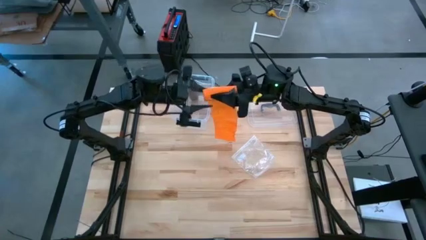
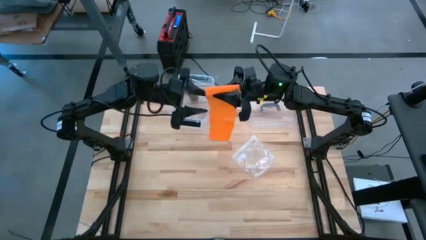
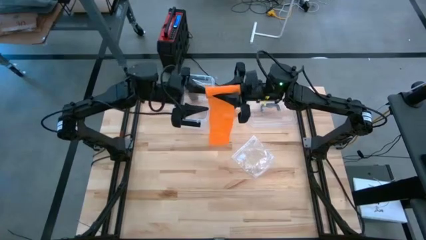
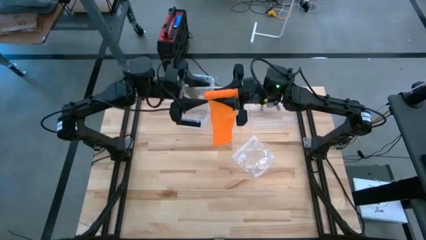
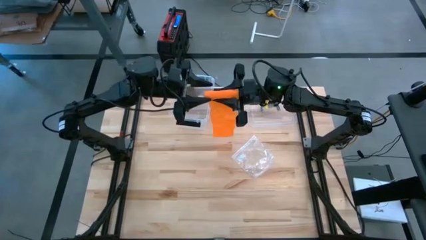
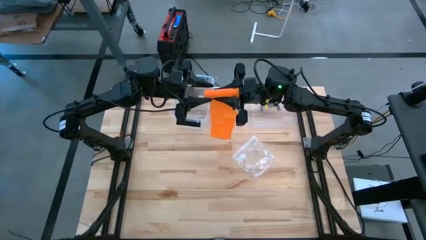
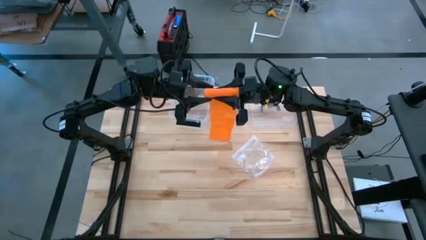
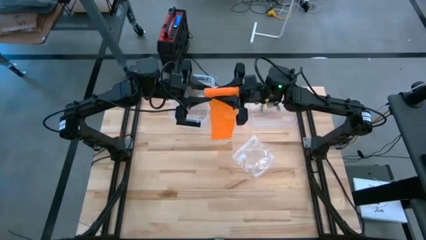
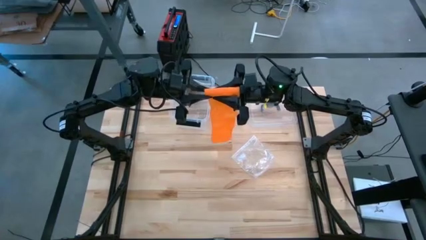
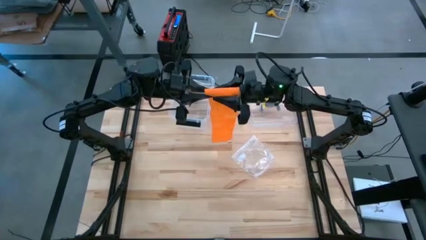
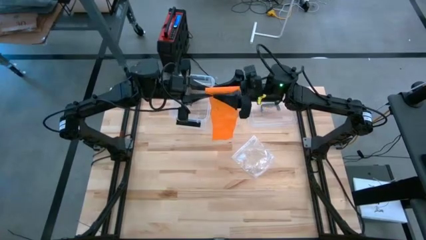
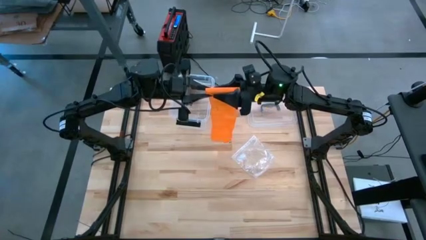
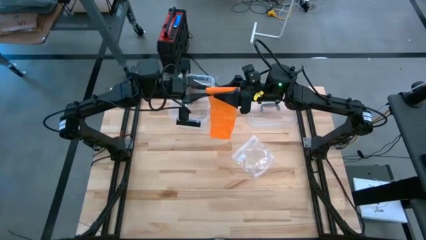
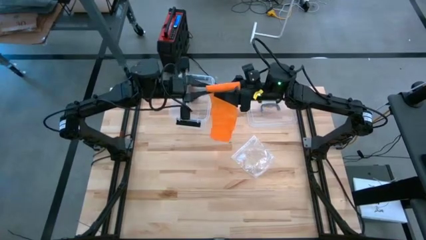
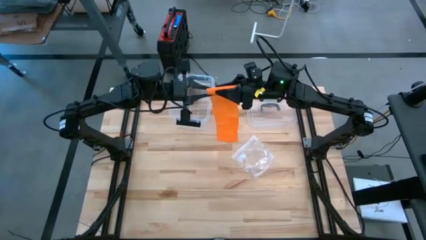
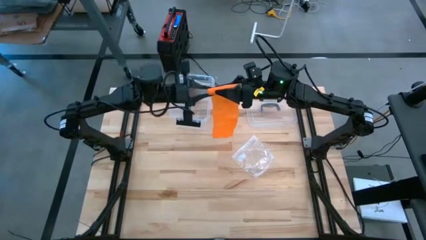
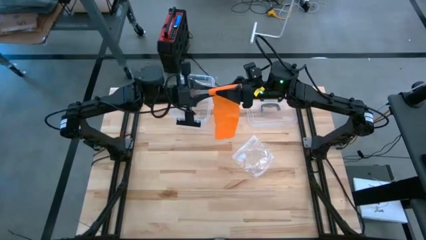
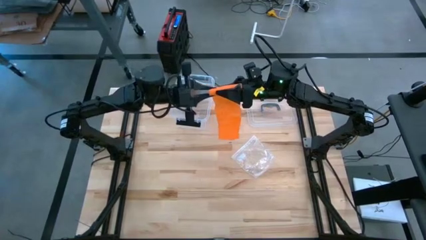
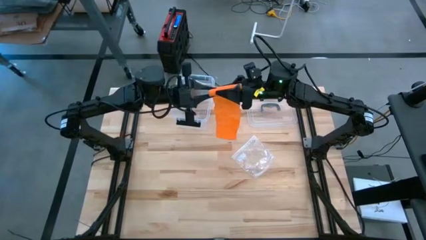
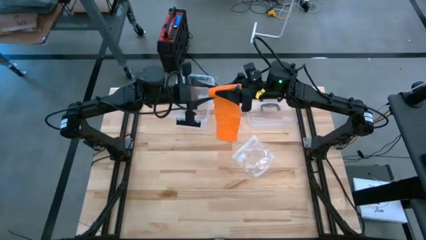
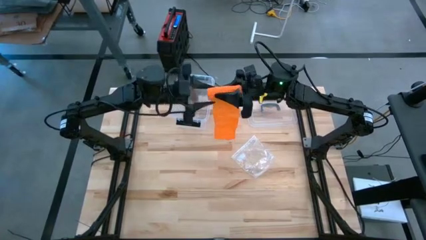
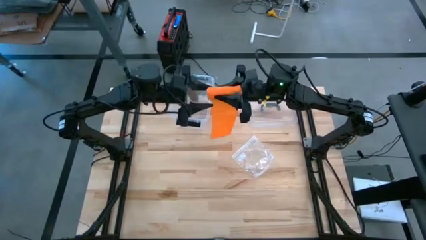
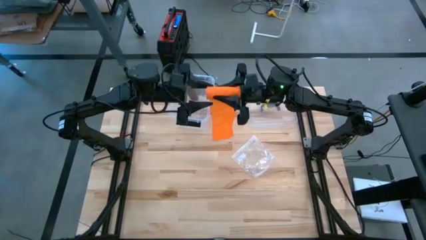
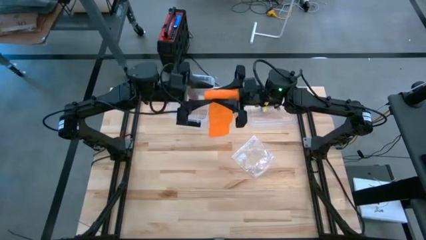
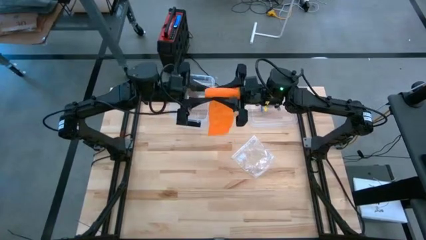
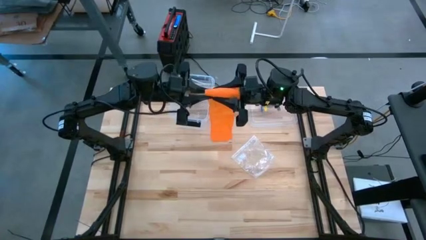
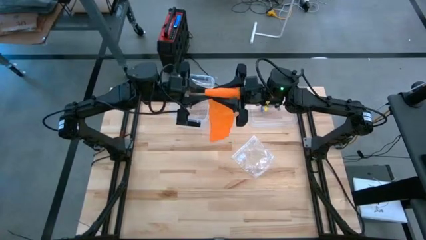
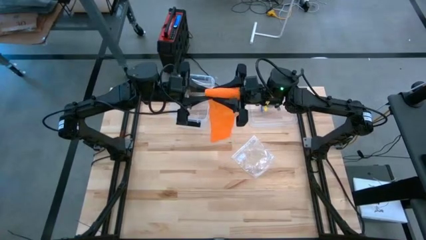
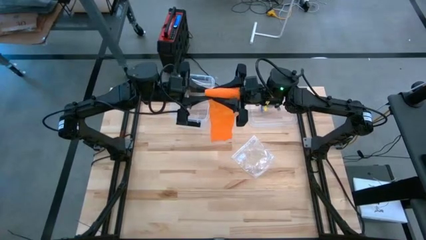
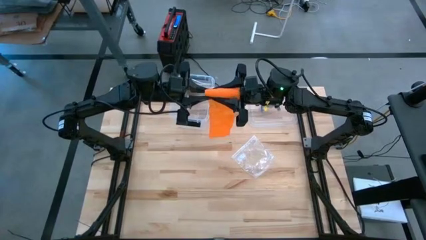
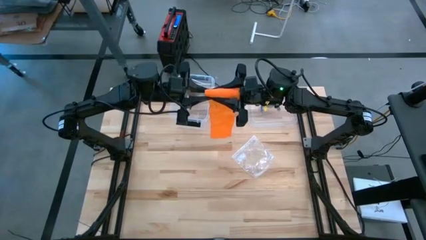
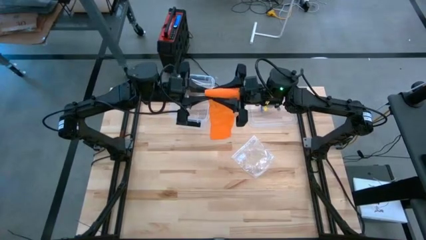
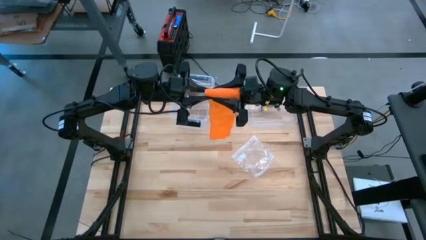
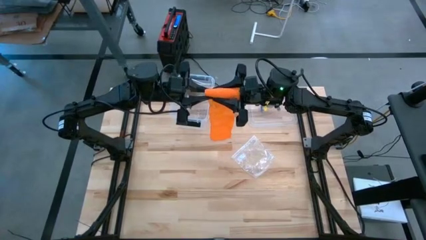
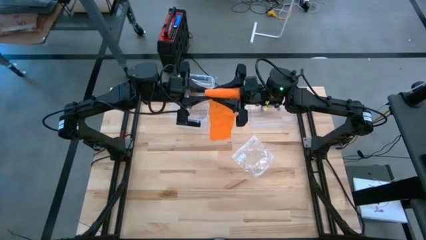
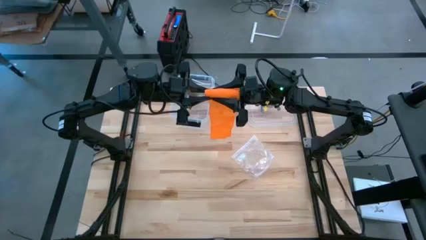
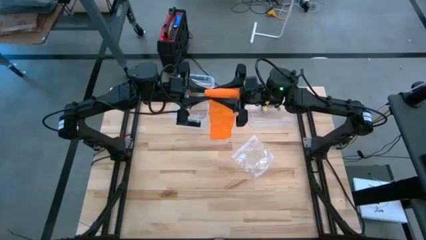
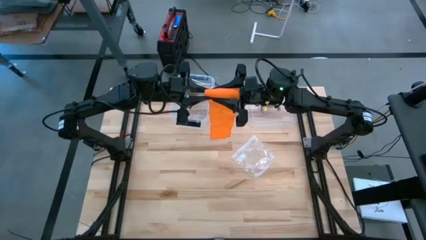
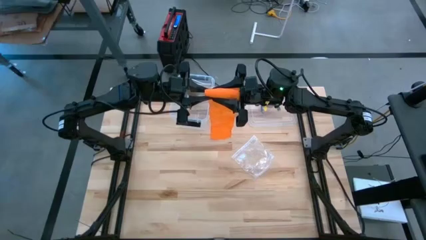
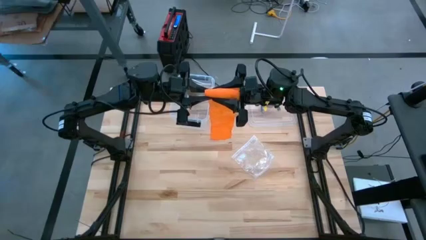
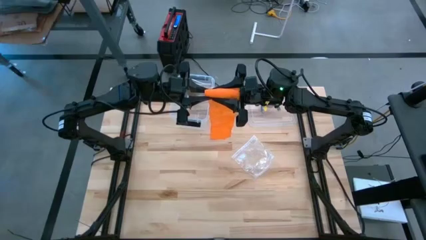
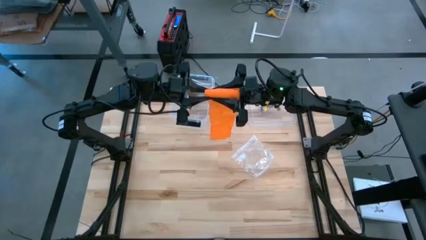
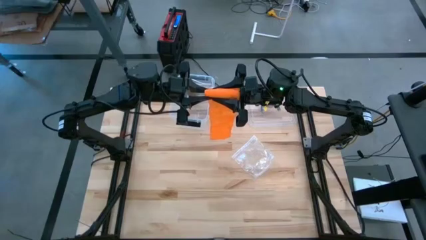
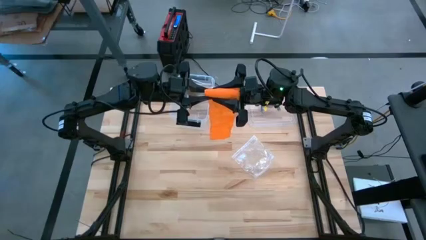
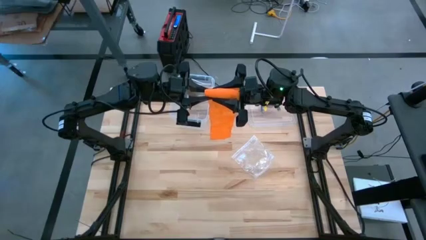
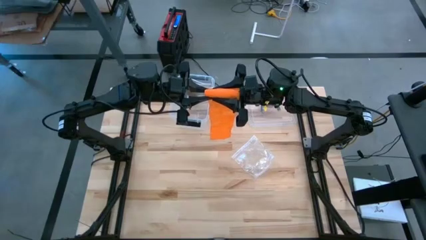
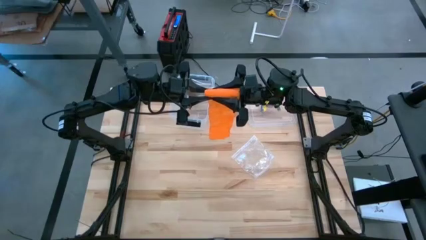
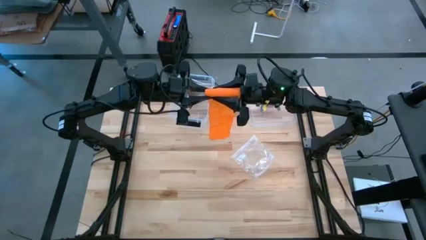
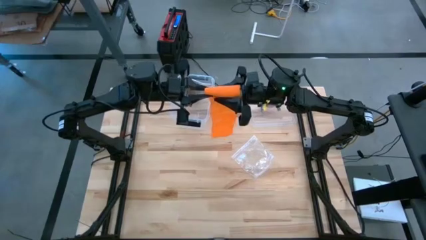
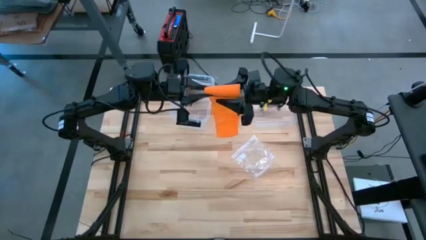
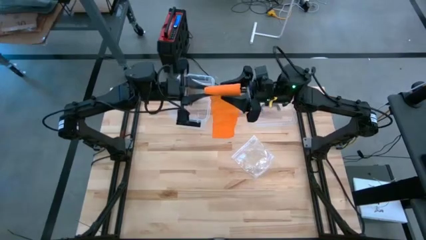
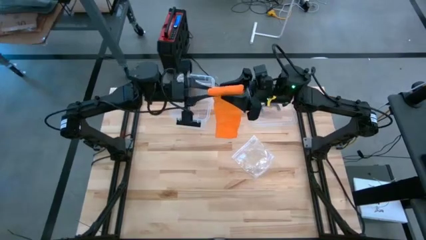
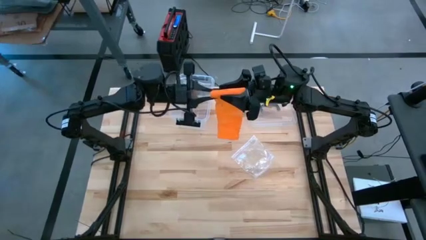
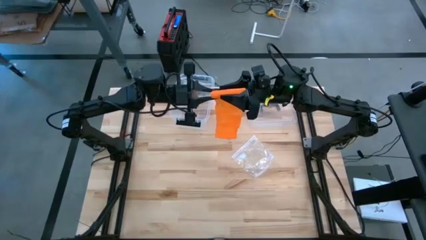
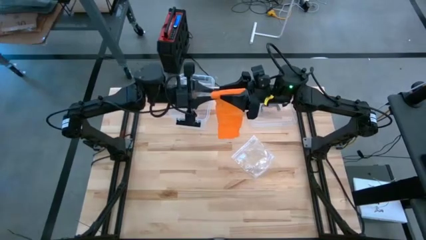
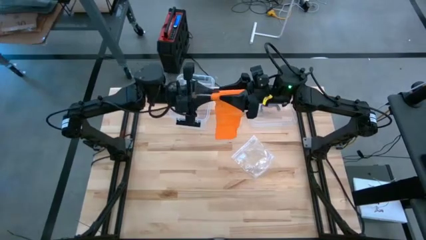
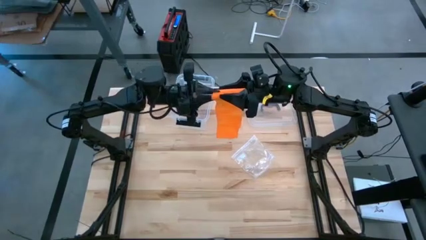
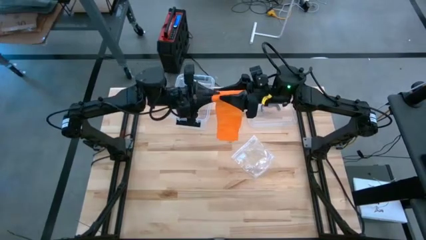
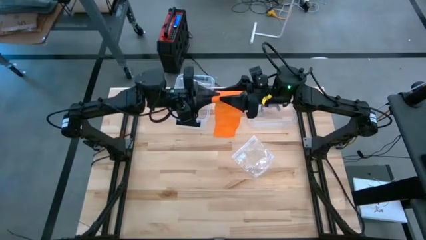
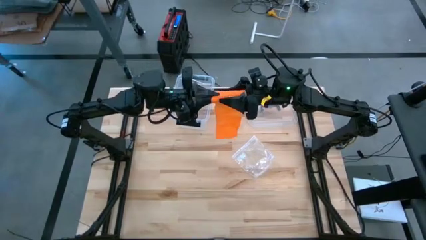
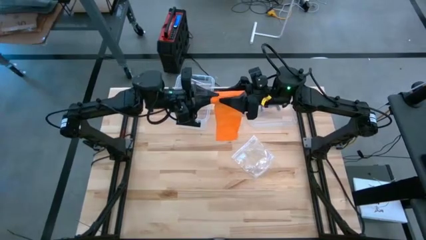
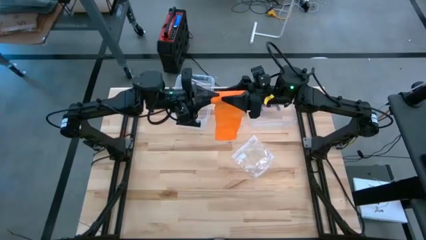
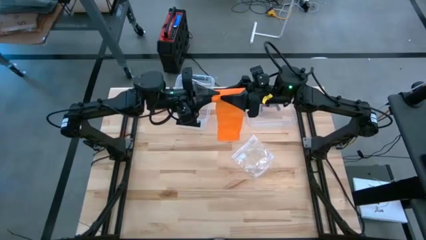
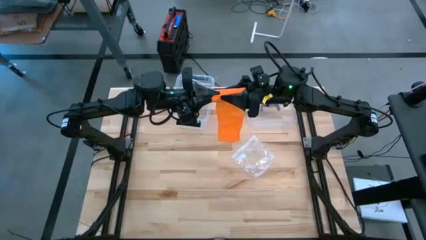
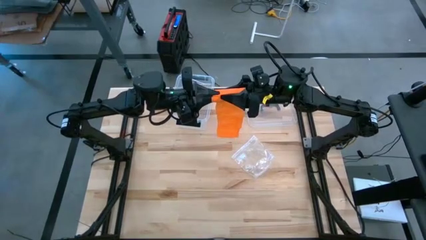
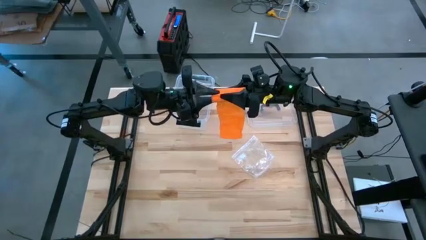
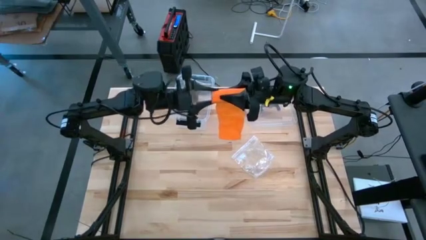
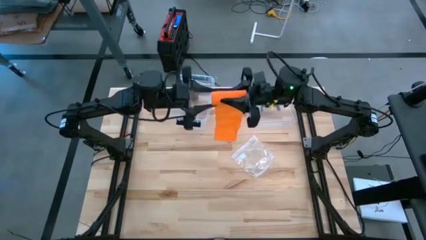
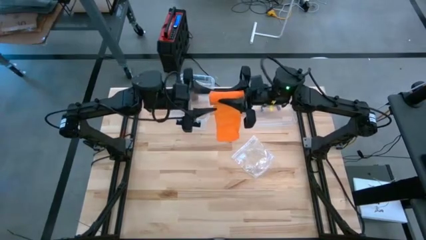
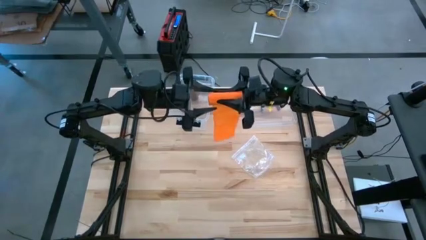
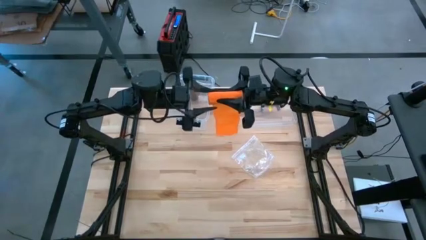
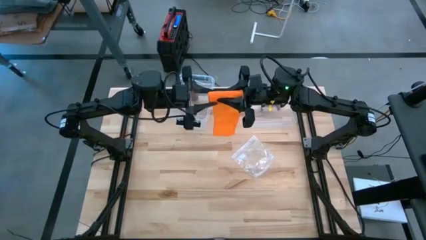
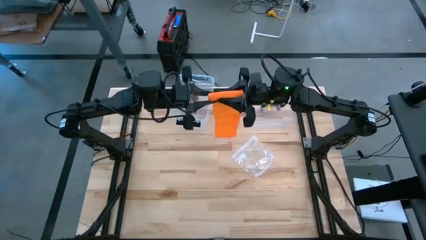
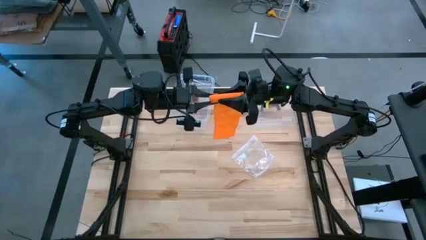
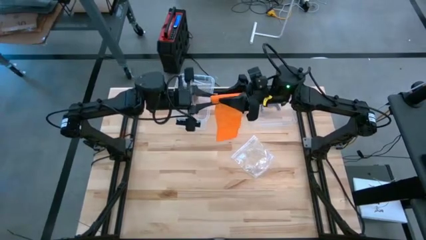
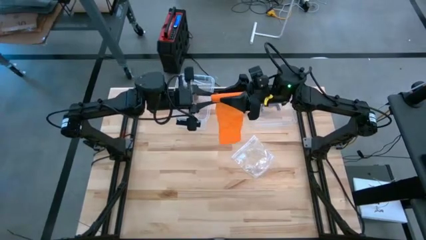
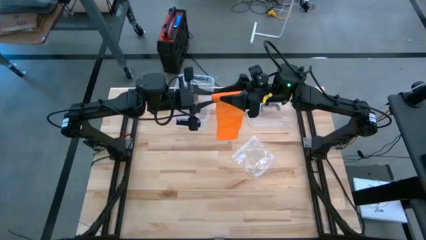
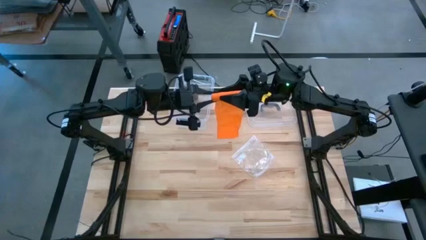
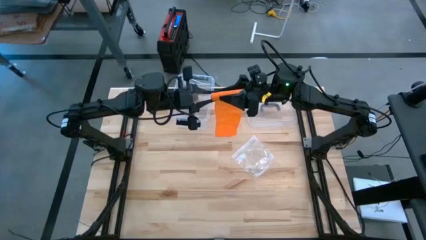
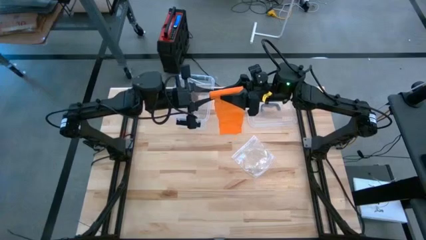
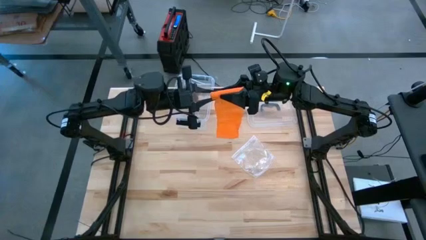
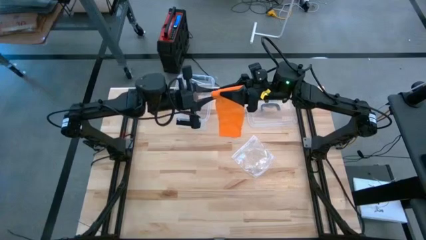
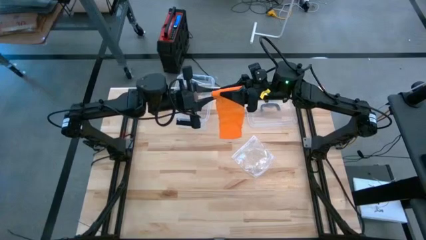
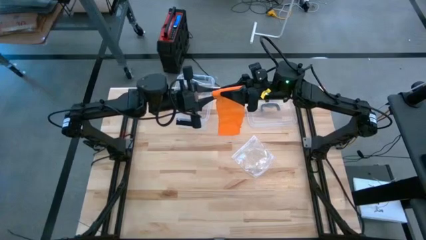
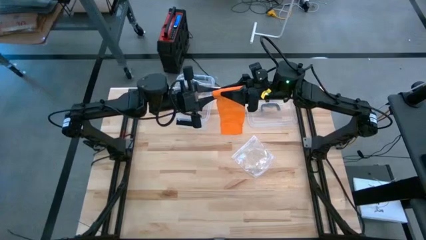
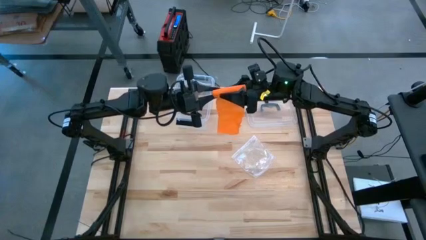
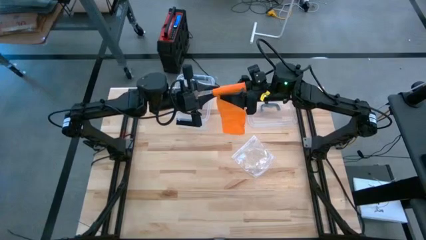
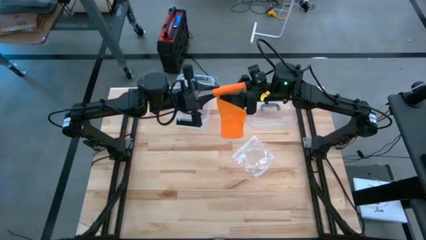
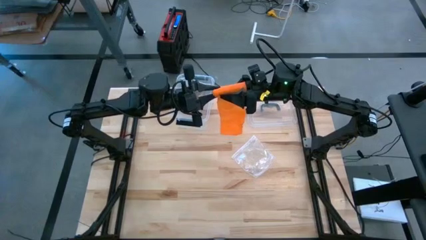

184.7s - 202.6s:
Task: Roll bandage
Roll the orange bandage
